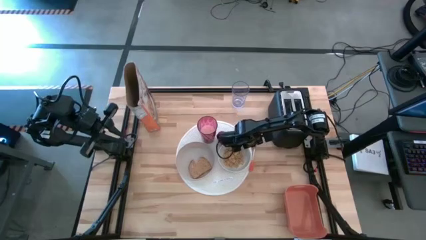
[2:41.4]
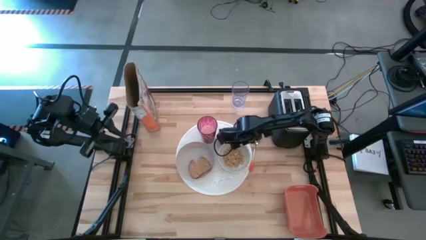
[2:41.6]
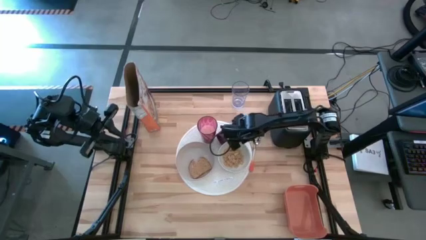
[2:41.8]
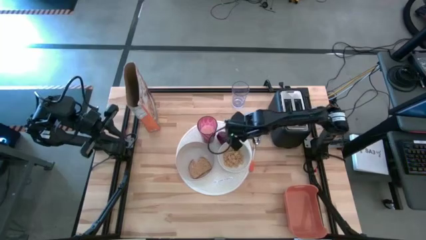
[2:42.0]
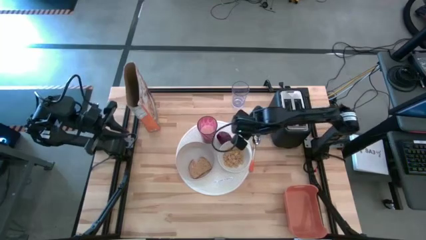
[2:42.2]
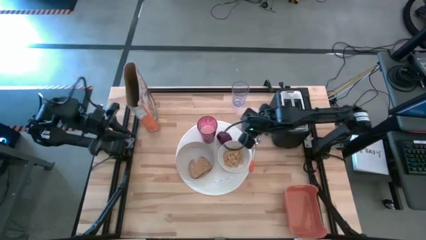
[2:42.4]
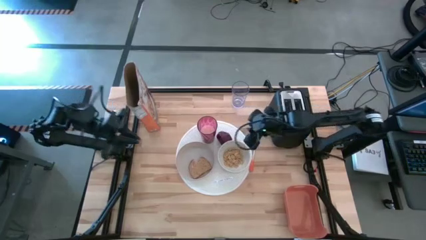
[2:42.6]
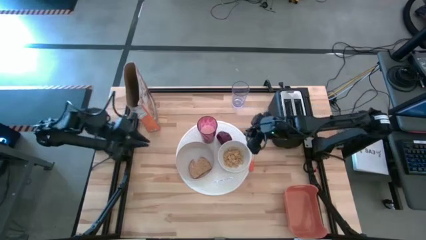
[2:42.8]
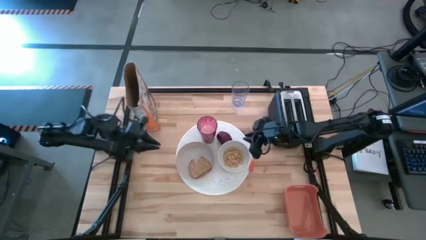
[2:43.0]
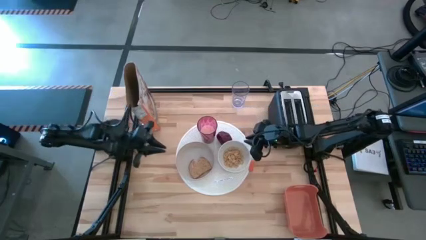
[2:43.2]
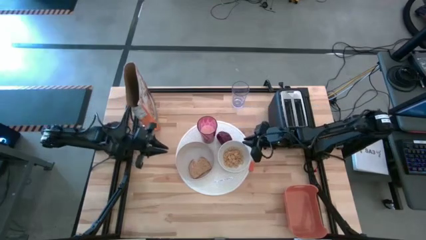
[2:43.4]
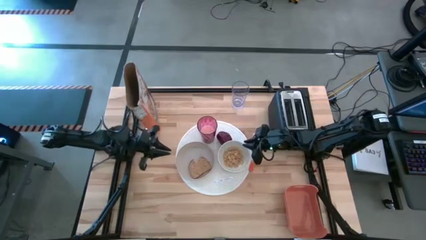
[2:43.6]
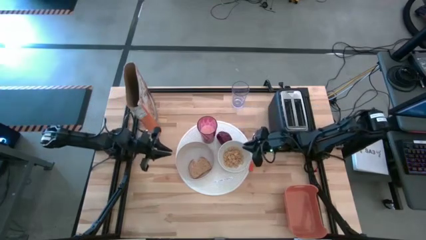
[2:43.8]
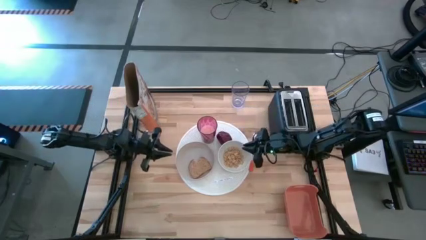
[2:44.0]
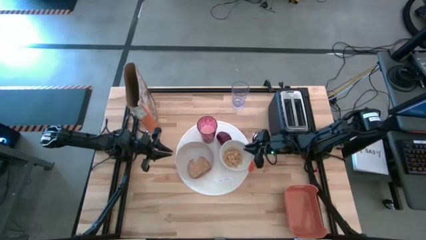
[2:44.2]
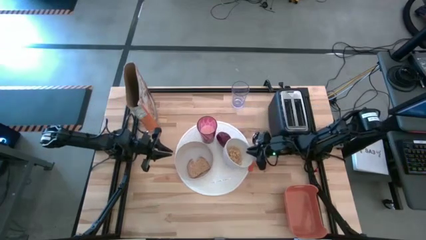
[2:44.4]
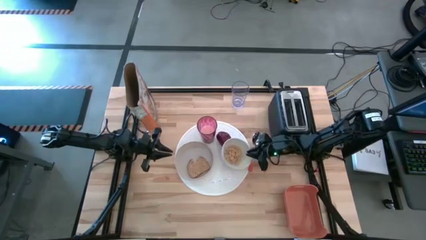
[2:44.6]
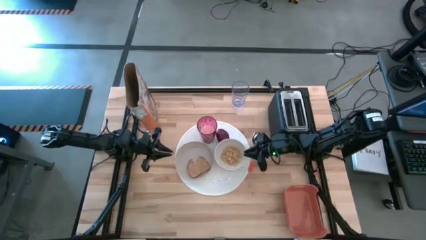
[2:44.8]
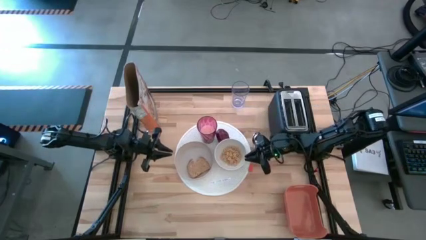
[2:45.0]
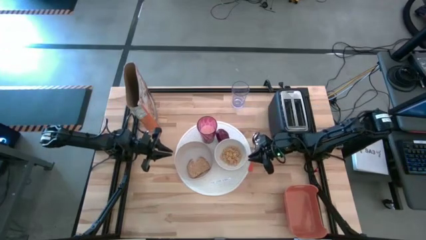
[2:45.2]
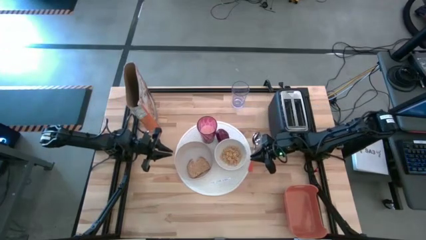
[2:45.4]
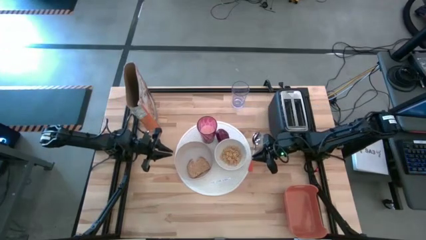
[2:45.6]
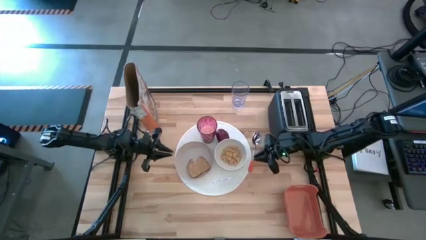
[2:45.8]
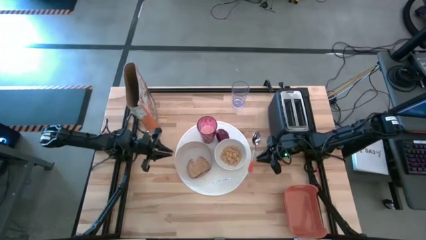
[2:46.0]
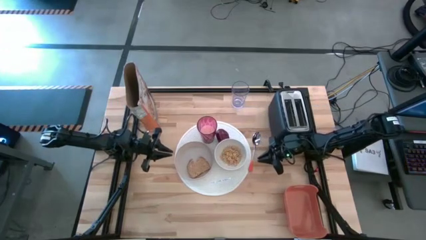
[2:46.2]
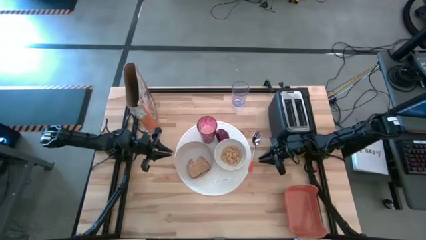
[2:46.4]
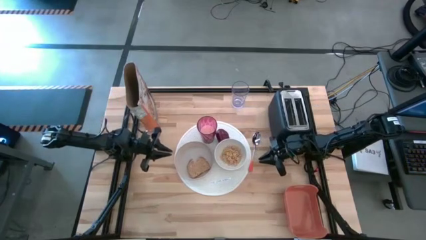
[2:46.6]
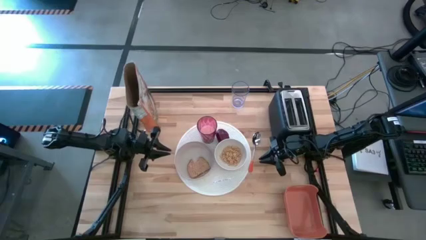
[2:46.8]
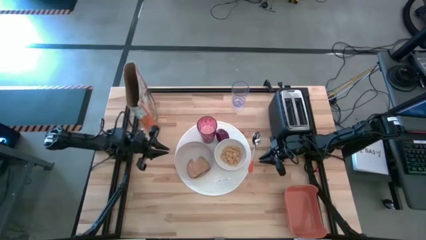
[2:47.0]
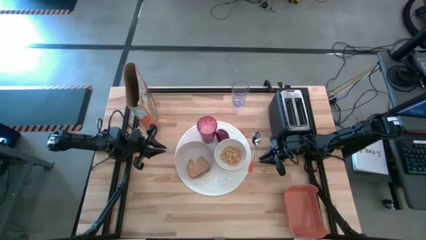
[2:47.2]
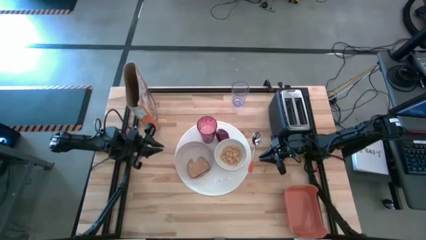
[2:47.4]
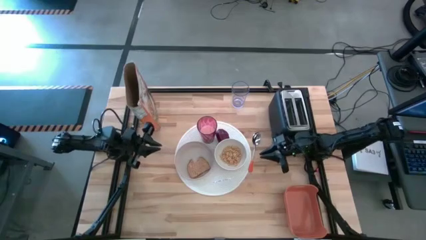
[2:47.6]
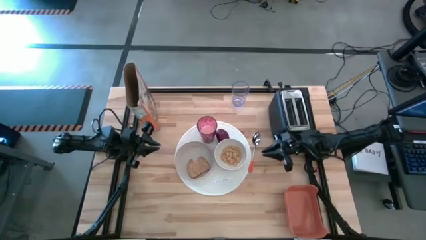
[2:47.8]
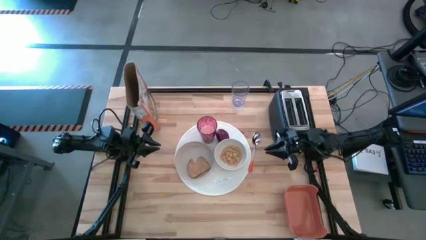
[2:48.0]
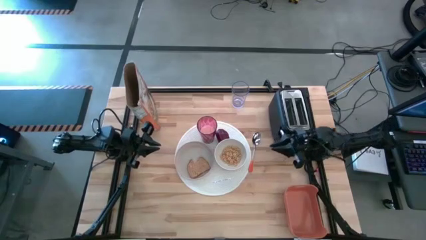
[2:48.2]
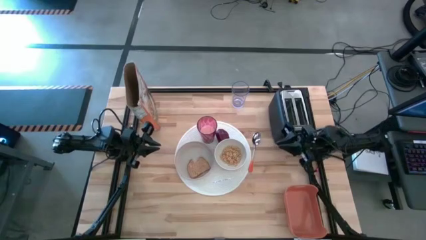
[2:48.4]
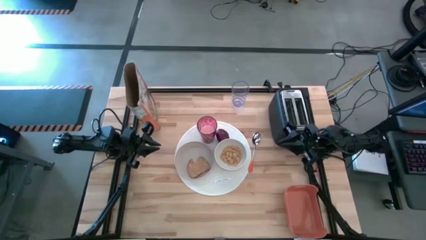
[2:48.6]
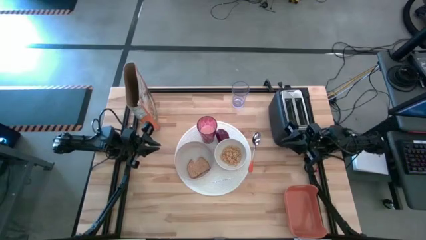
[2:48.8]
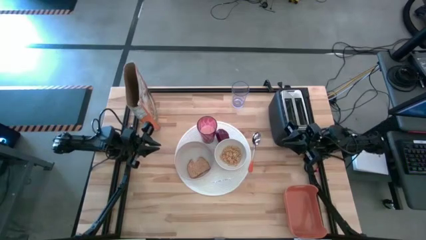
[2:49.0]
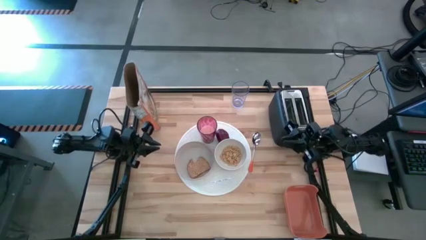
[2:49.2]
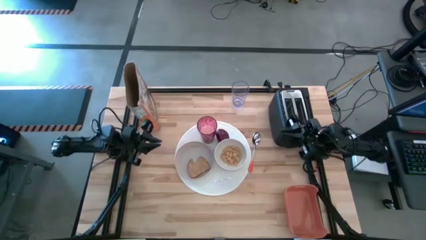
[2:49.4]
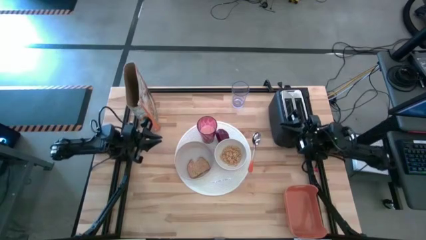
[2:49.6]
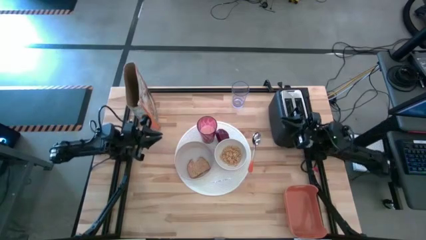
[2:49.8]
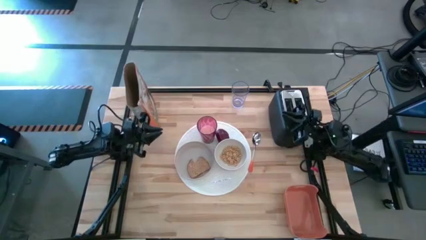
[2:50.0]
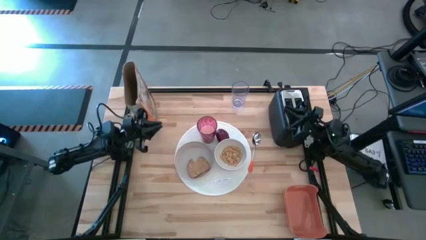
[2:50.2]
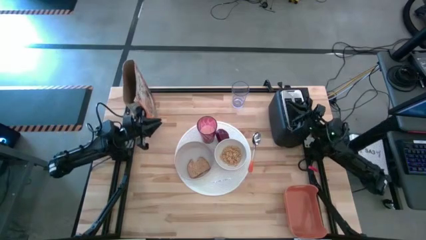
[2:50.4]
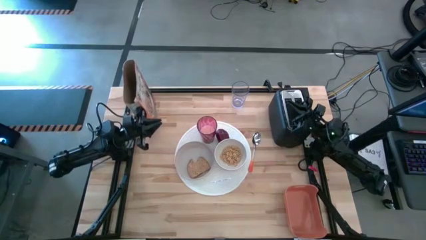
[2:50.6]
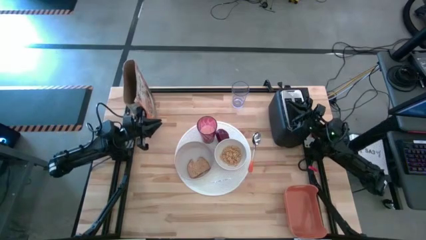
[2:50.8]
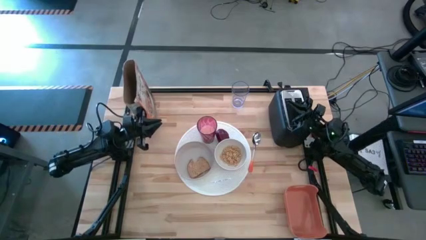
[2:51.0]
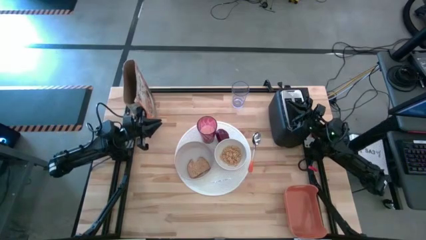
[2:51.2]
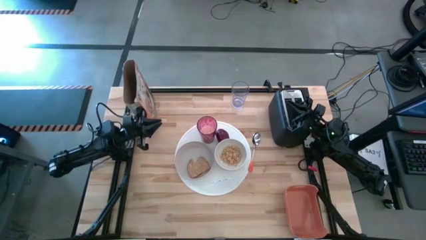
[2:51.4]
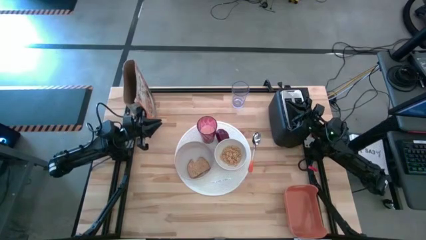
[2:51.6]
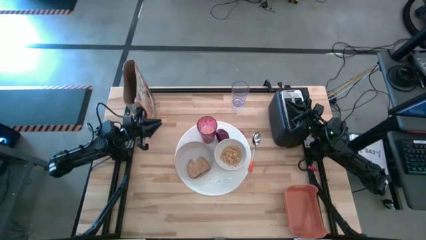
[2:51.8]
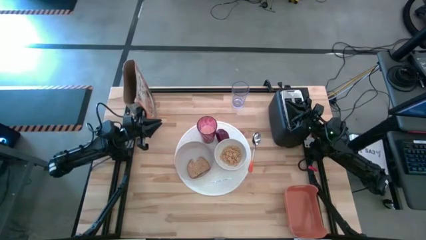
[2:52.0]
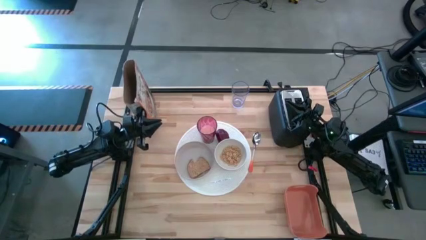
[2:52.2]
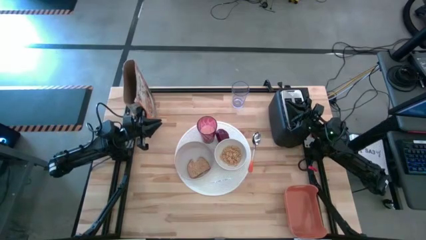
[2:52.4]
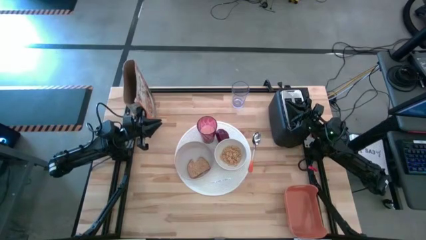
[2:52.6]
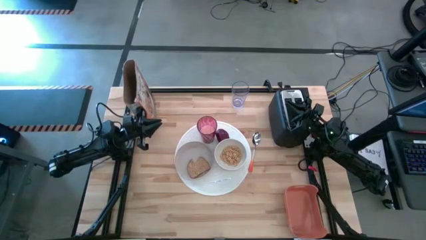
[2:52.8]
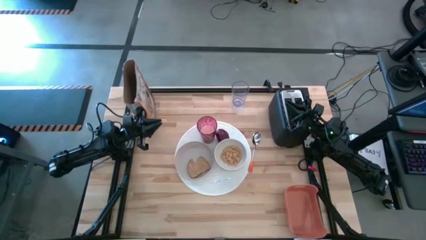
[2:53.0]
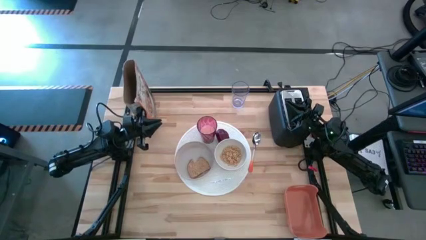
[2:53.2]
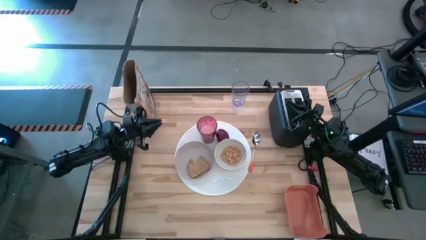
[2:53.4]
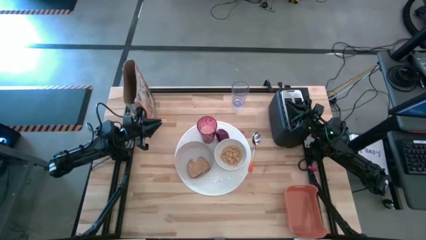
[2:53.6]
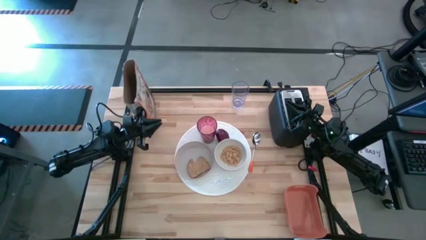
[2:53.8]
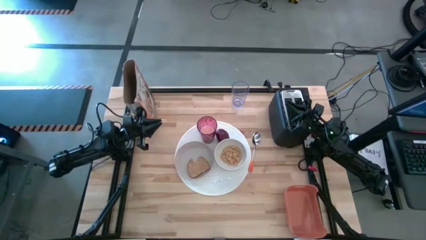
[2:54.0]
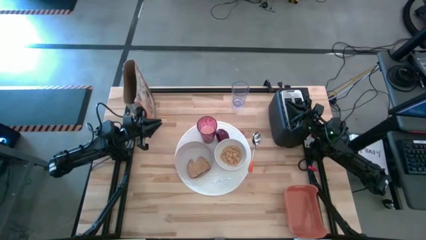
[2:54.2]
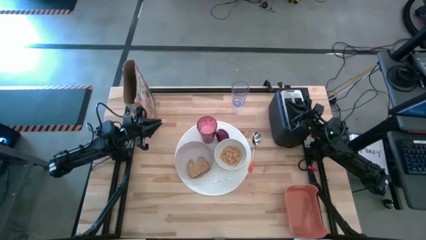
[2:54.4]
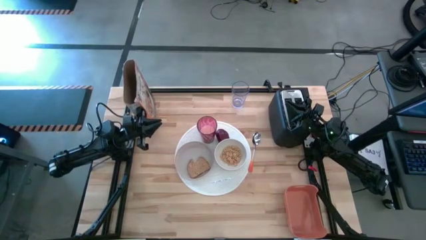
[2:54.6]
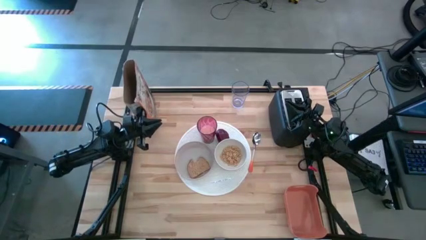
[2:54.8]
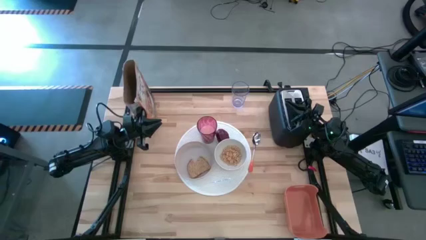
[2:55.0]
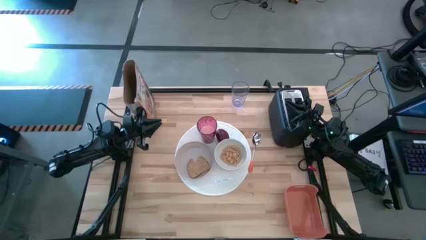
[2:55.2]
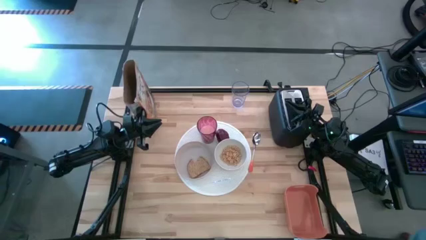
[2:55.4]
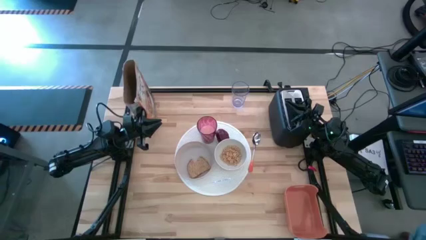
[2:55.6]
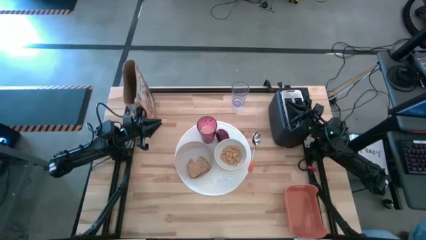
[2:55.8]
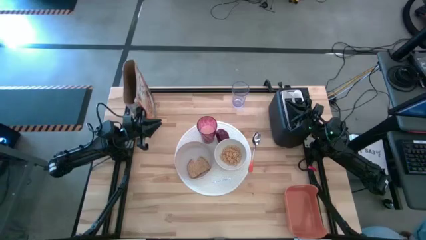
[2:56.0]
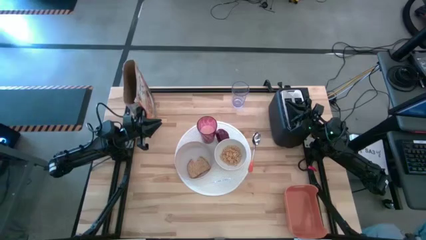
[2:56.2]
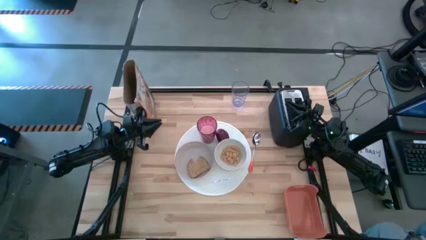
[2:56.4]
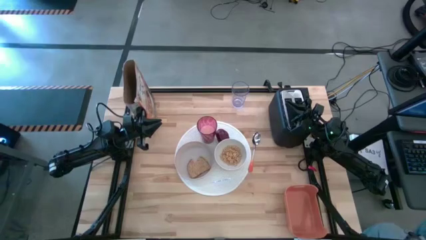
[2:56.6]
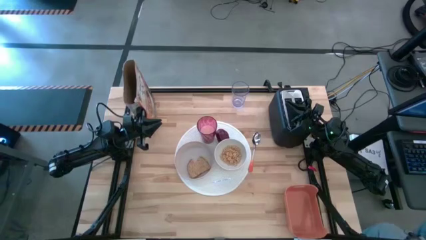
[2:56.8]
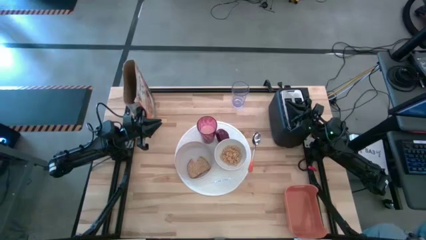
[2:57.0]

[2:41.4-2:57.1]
Task: Arrange a breakfast setting
Return to Home Position

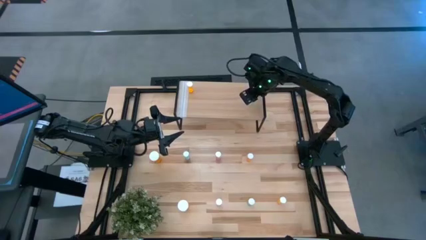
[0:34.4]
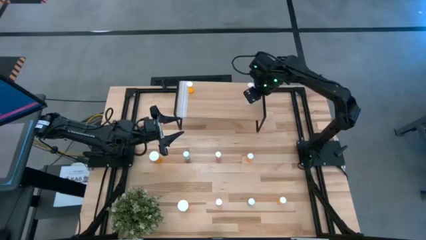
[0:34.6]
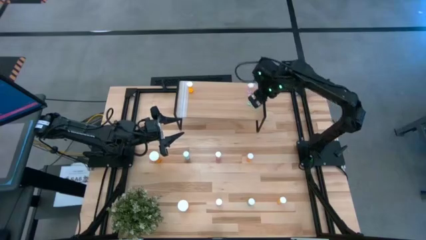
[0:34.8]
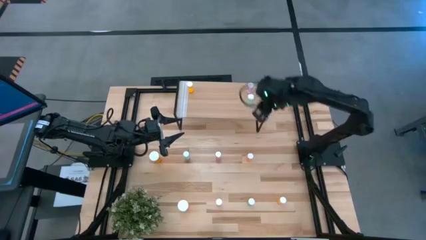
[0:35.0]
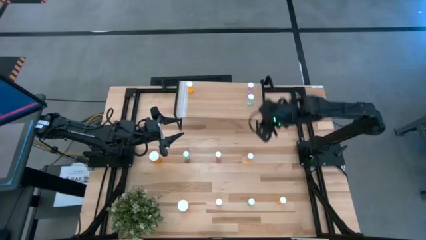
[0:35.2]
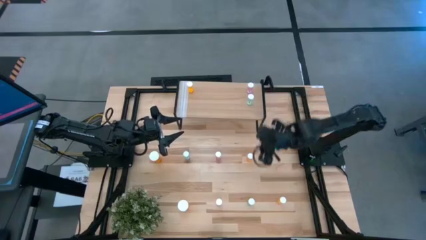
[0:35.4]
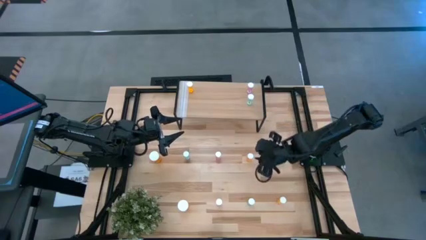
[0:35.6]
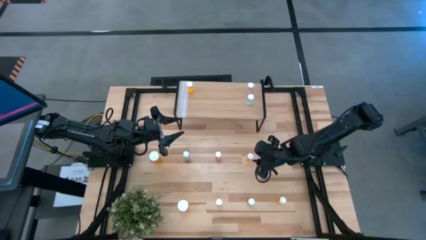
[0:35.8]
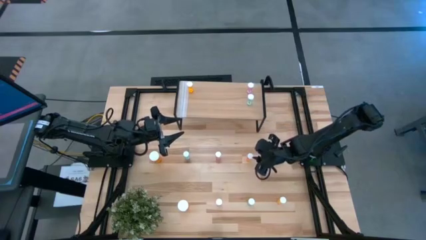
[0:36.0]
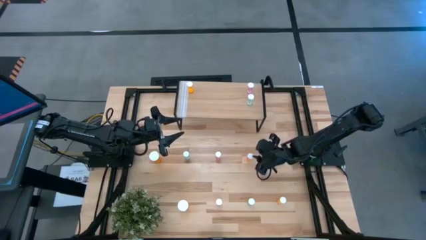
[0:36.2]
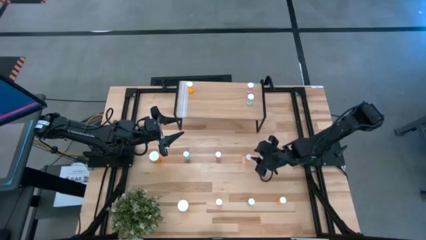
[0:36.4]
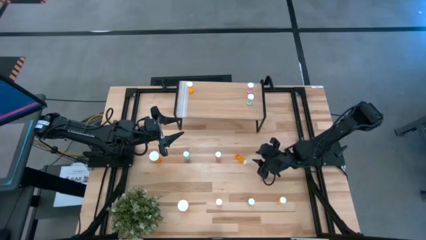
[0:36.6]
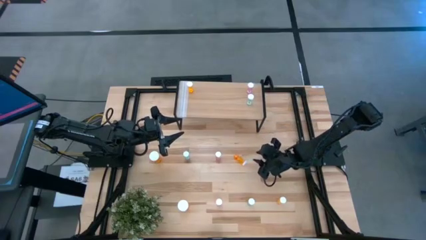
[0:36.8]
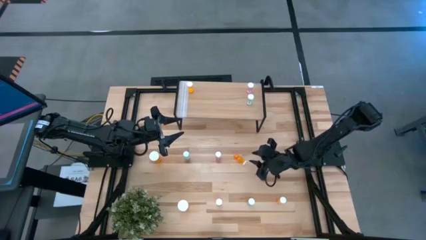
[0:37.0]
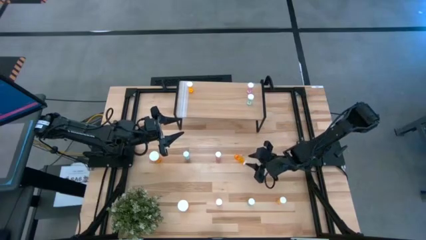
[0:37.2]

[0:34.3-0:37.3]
Task: Pick and place medicine bottles onto shelf by color
Put the top orange small pill bottle on the shelf
